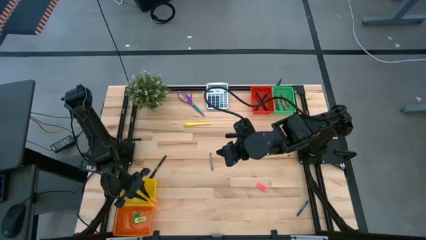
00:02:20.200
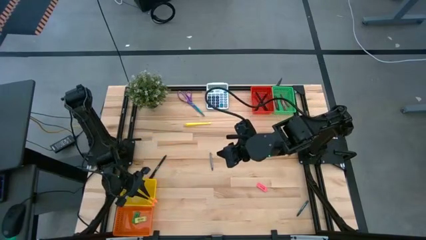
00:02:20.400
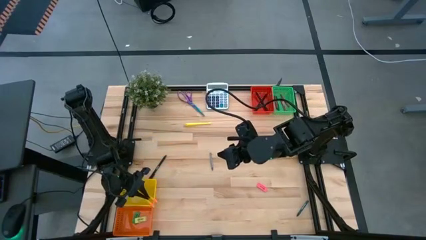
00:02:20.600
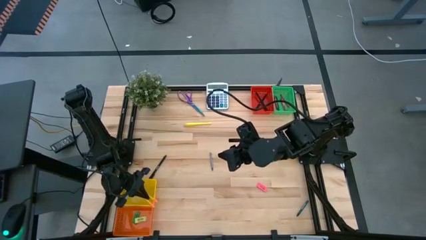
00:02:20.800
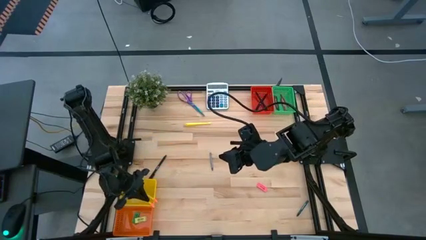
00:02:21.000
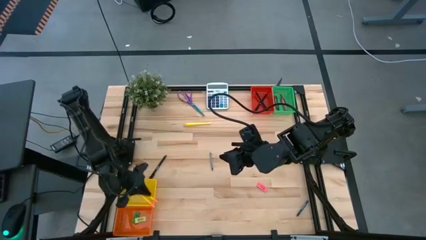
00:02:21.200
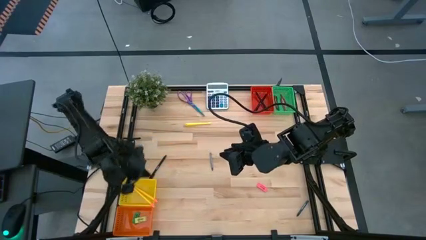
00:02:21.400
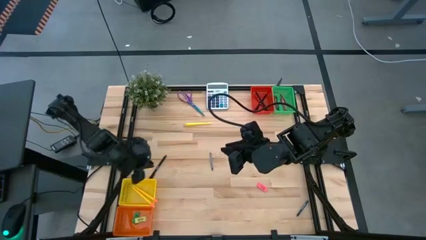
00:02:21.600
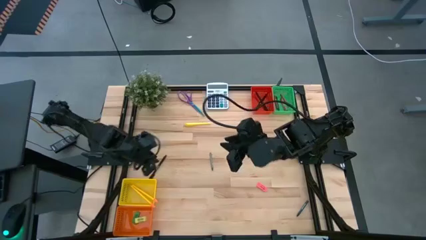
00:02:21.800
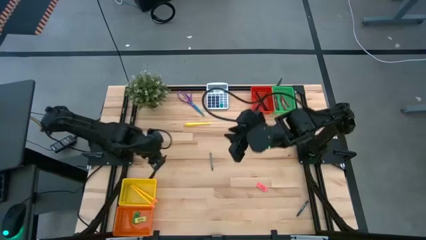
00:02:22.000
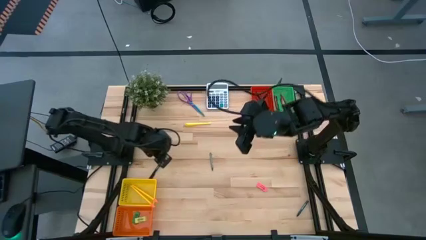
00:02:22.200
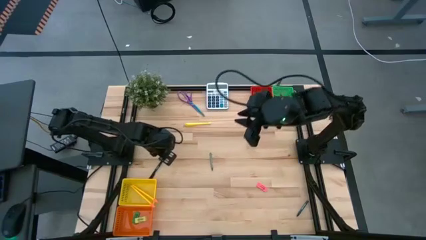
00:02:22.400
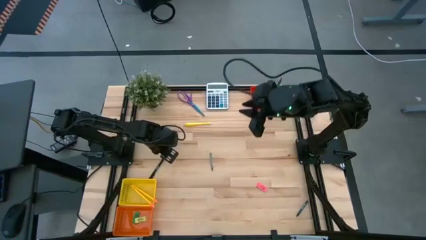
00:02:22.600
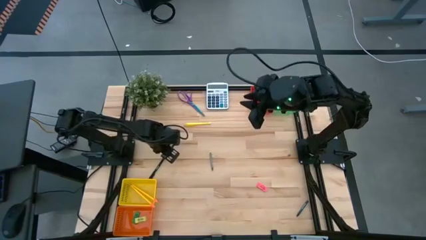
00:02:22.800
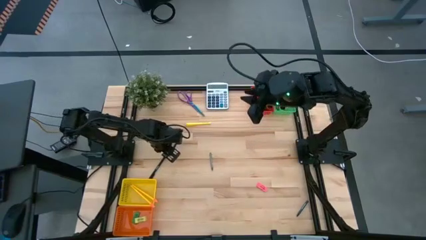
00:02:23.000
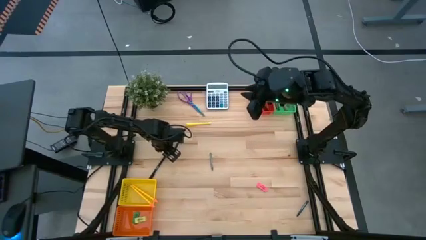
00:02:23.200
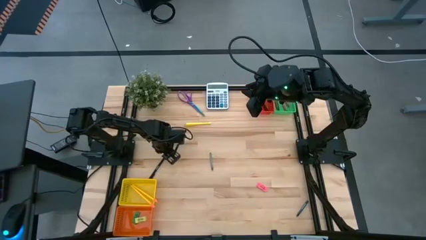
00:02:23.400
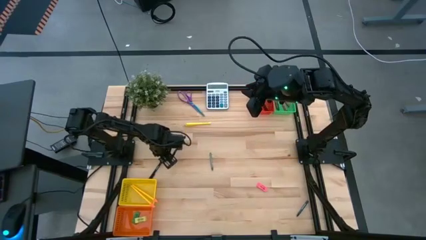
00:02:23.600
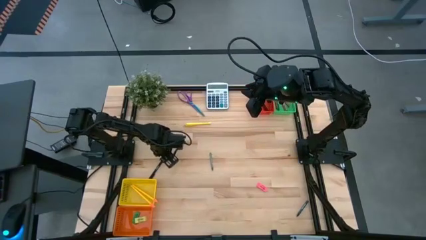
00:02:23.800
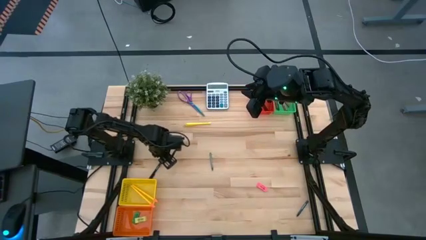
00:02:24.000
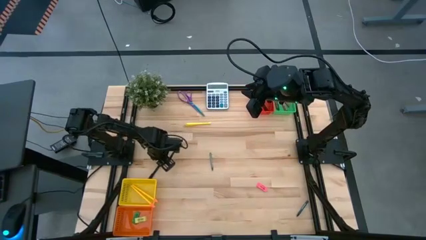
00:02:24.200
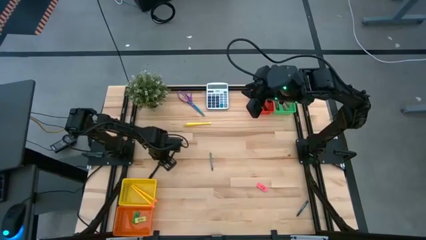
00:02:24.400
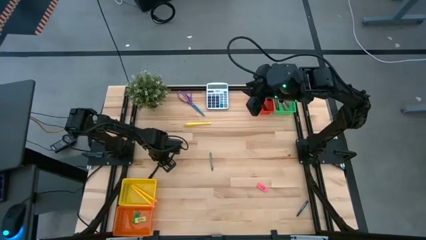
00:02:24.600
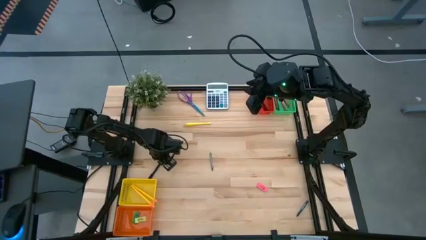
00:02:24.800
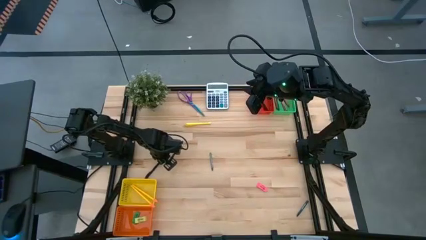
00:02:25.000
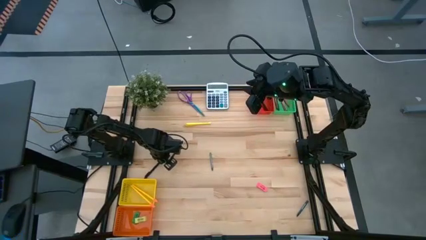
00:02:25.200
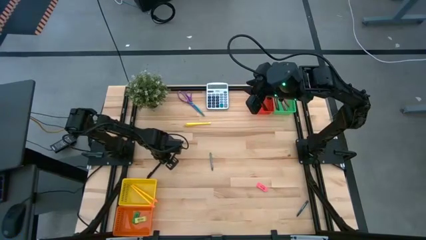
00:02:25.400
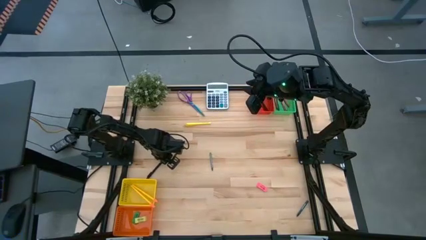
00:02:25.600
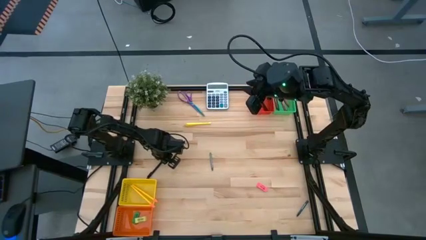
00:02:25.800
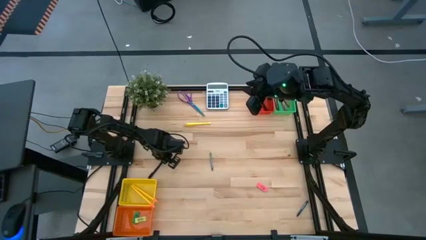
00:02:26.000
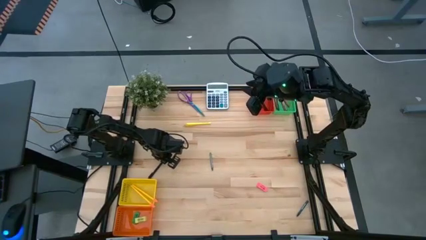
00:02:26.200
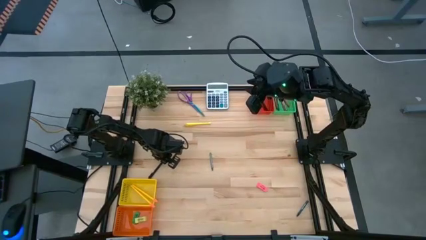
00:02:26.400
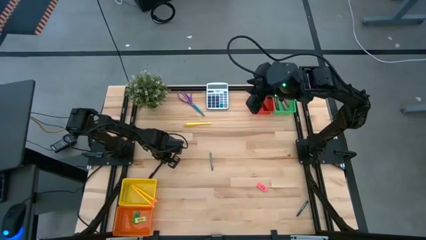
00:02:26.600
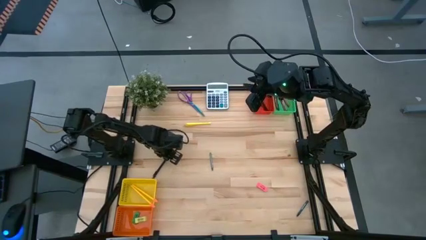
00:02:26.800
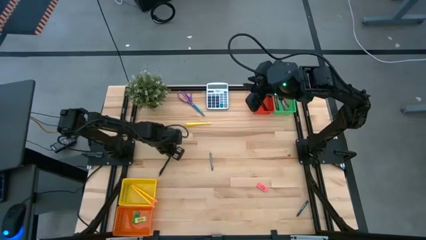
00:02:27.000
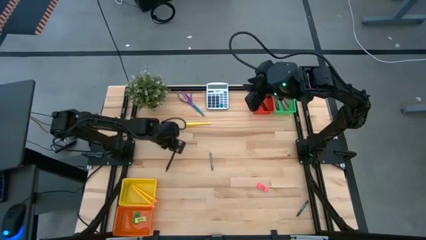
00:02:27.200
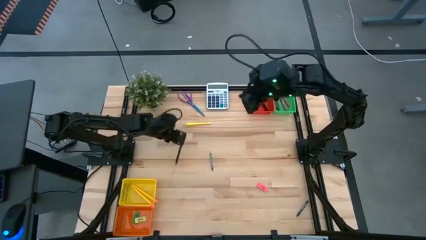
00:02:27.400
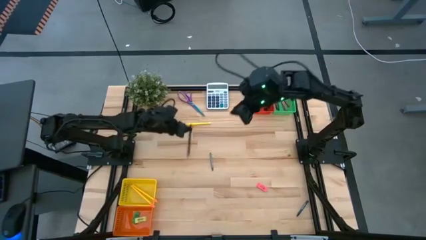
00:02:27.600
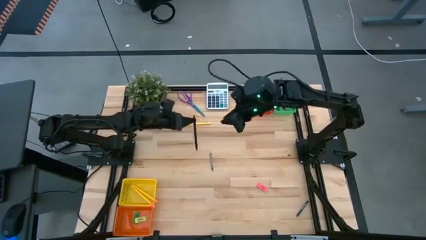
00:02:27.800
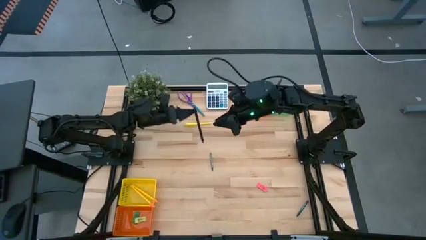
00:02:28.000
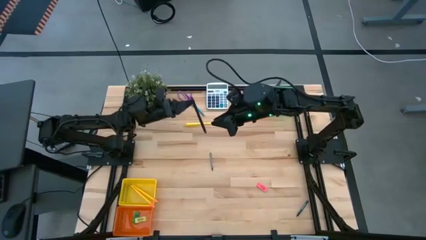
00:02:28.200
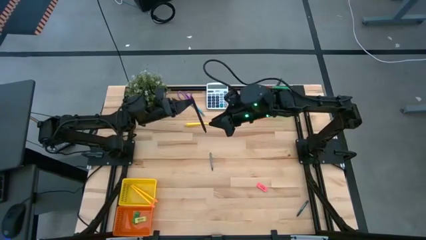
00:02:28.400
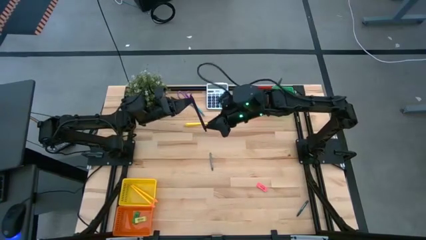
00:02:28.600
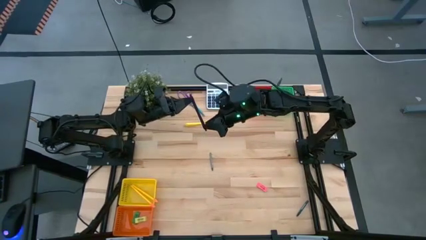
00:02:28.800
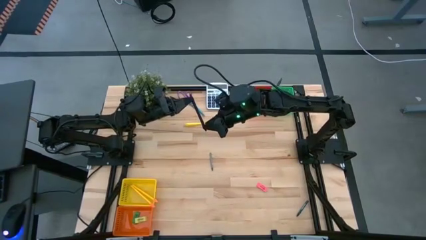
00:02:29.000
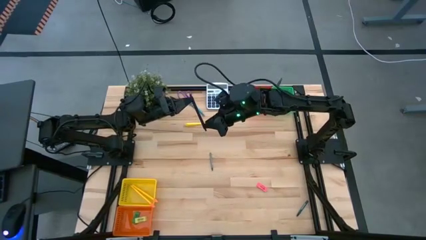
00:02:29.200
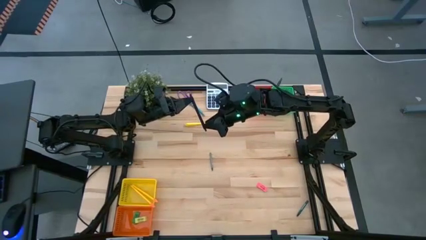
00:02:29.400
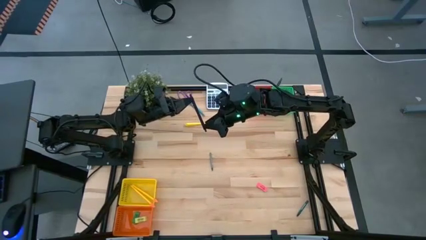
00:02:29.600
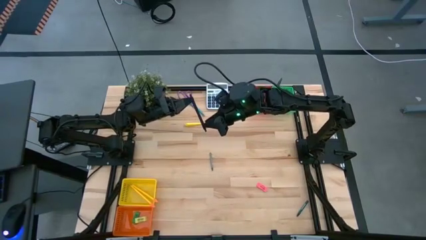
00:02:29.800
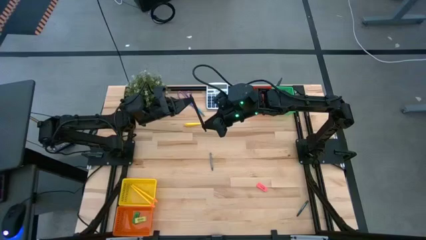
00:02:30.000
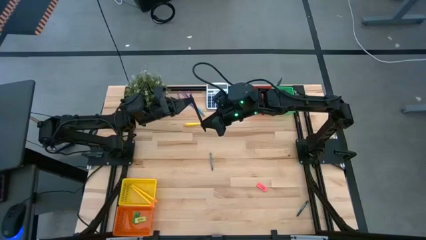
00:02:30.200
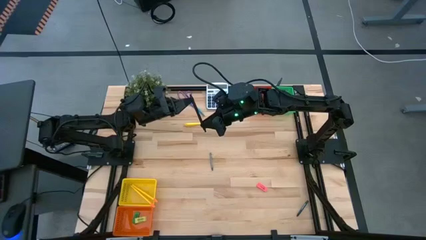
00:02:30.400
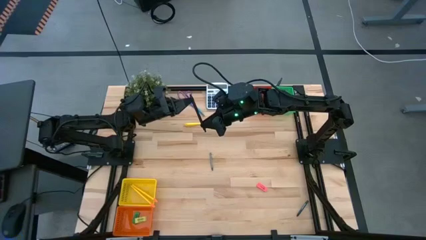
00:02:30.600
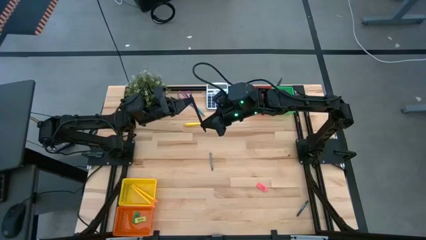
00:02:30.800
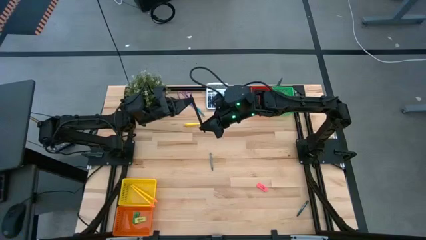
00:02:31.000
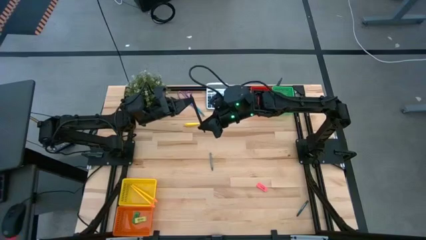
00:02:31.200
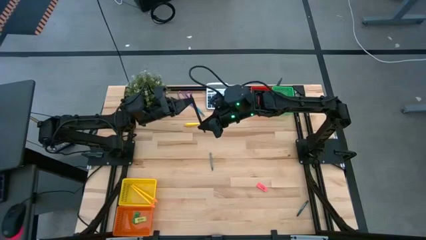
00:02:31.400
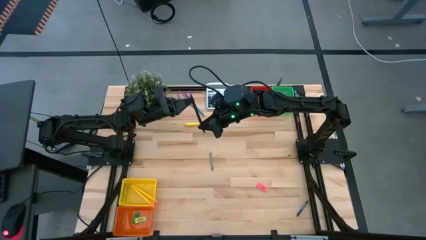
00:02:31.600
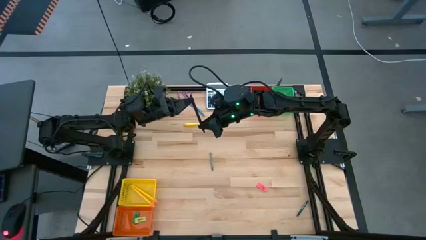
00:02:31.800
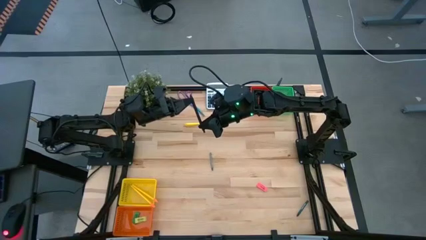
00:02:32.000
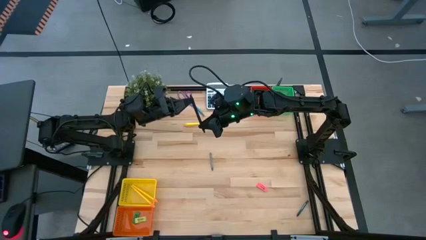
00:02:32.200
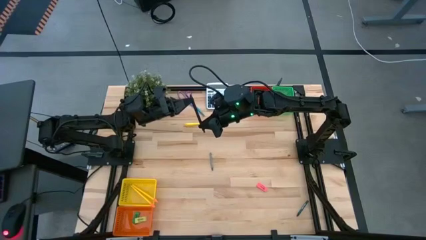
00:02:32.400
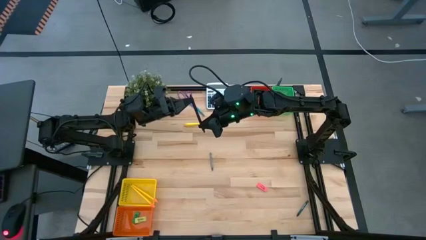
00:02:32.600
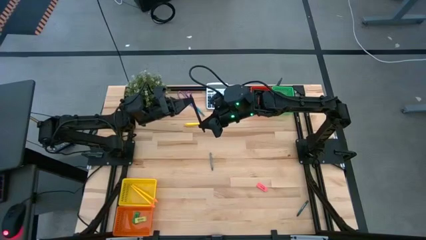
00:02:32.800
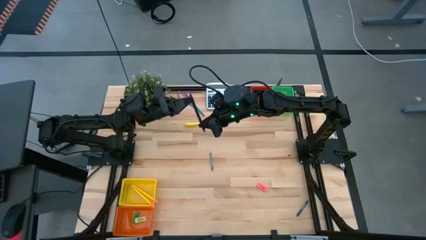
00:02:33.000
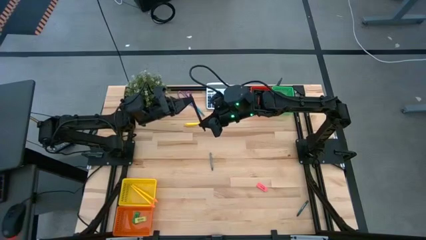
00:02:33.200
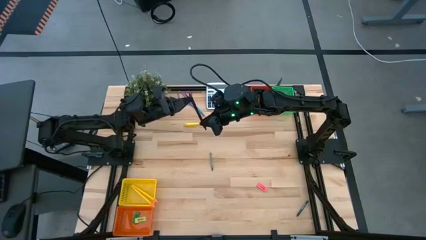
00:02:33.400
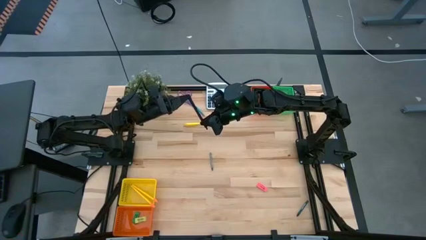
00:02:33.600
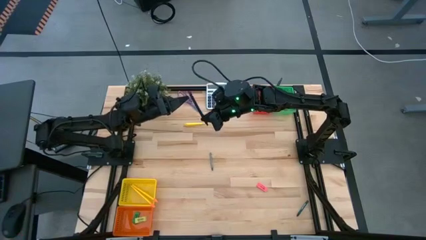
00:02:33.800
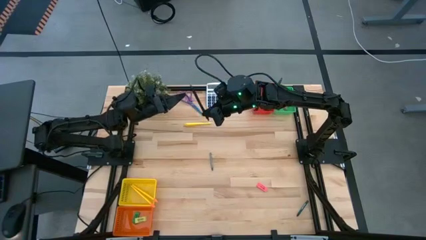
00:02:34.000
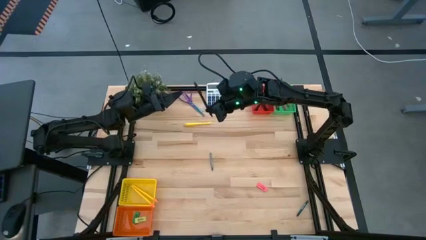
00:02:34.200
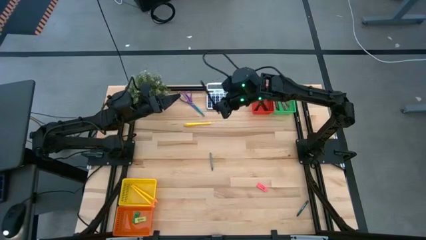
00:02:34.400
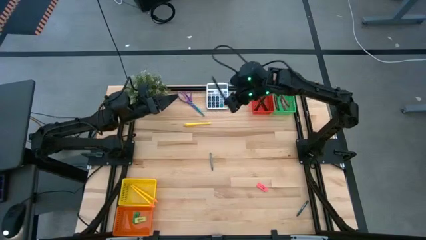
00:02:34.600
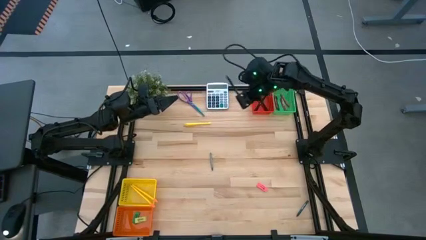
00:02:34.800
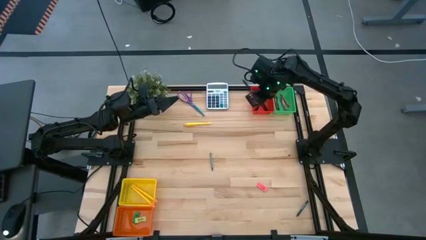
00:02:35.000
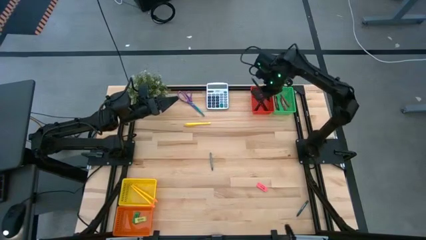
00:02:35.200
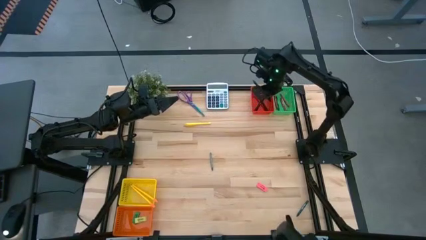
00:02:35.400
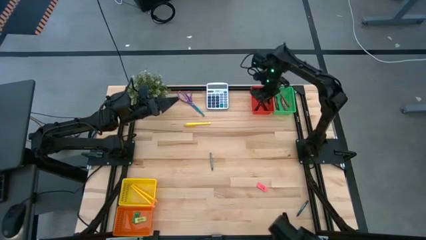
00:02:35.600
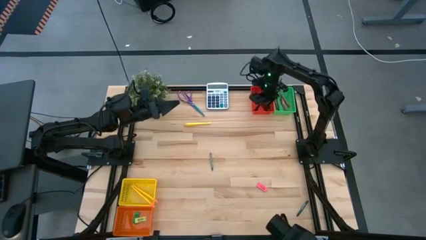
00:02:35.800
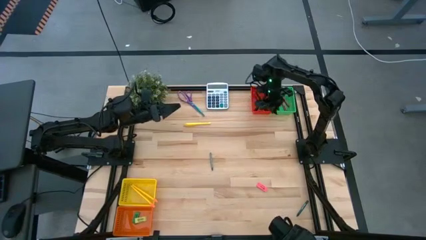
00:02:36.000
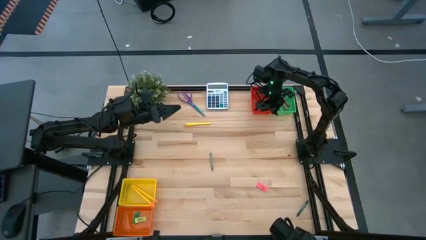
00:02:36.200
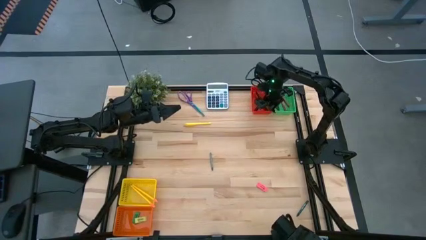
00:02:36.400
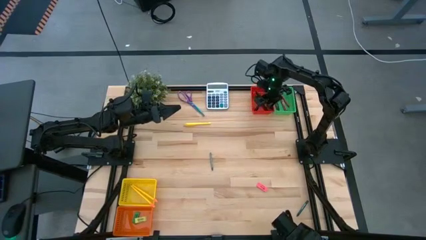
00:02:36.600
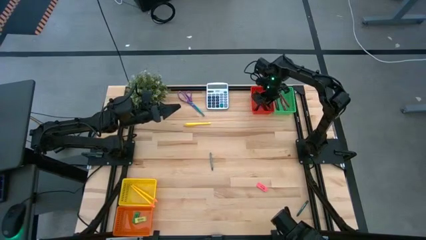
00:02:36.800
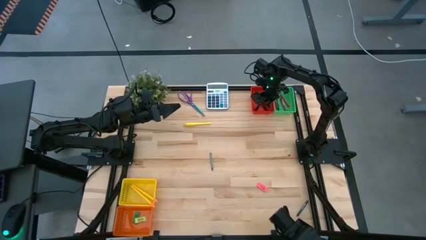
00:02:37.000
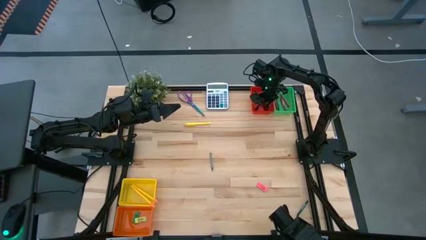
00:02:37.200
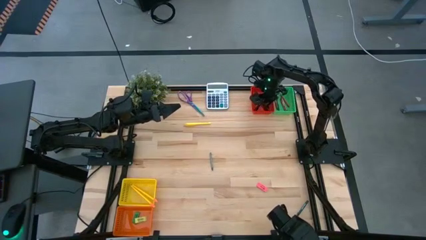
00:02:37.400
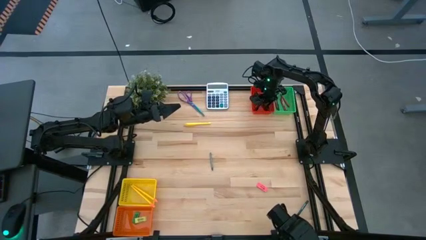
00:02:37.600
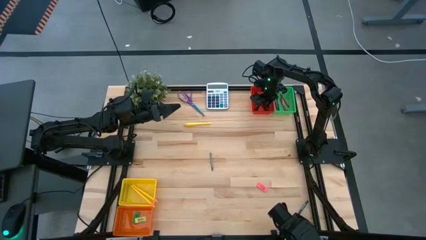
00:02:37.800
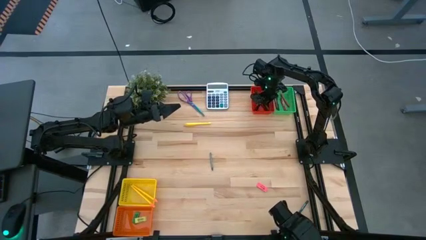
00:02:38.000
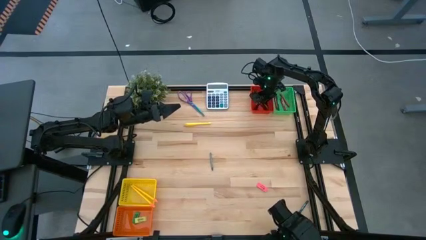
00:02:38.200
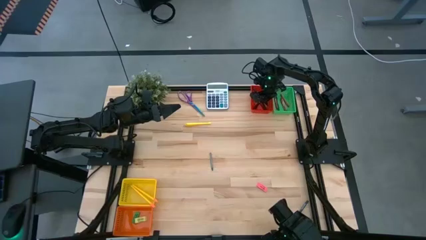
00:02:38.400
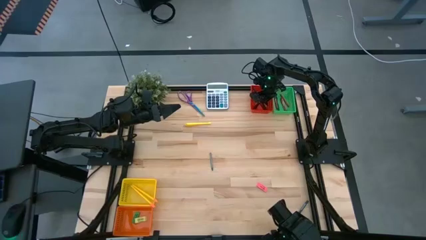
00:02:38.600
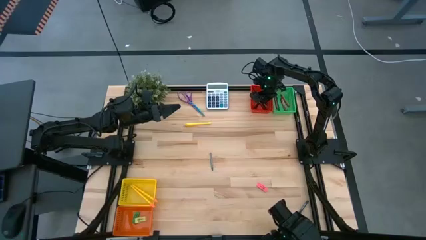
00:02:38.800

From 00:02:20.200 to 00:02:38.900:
Task: Sort crayons/erasers/pens/pencils in bins
Put the black pen into the red bin
